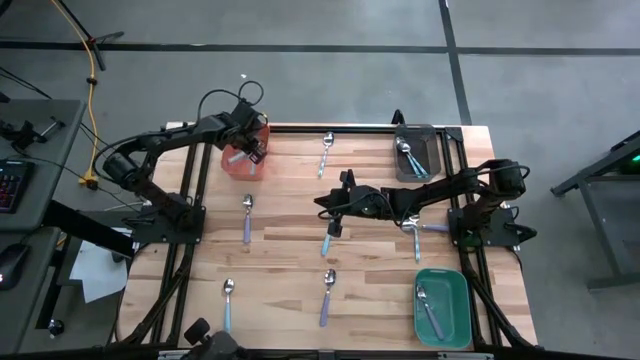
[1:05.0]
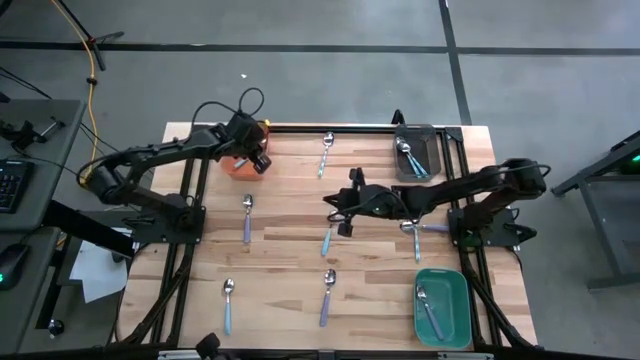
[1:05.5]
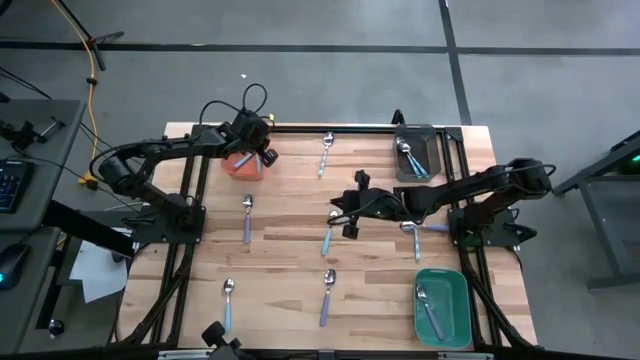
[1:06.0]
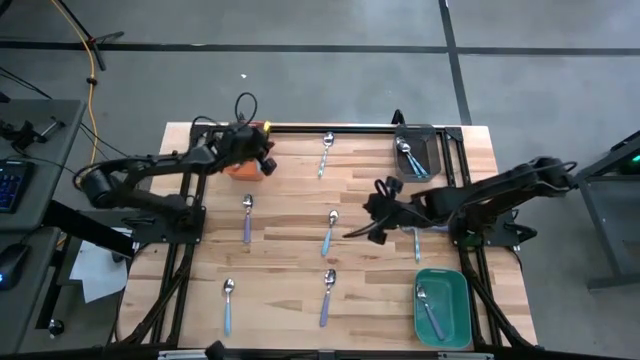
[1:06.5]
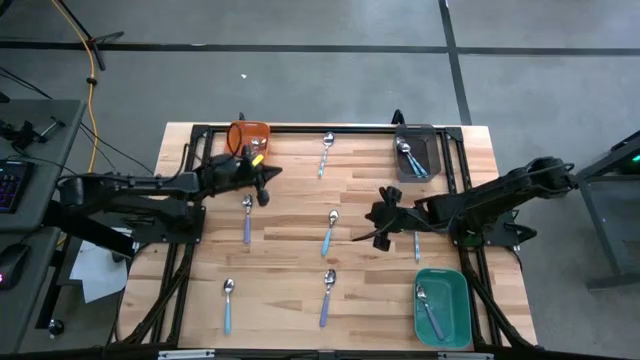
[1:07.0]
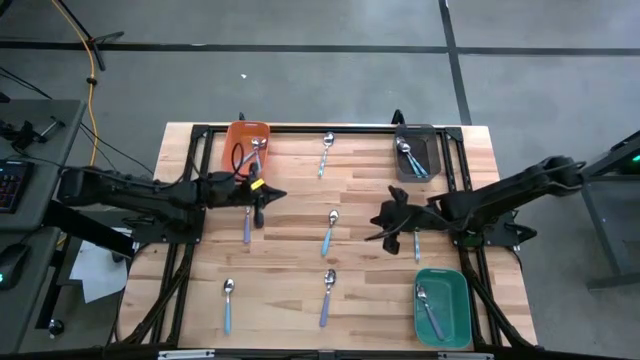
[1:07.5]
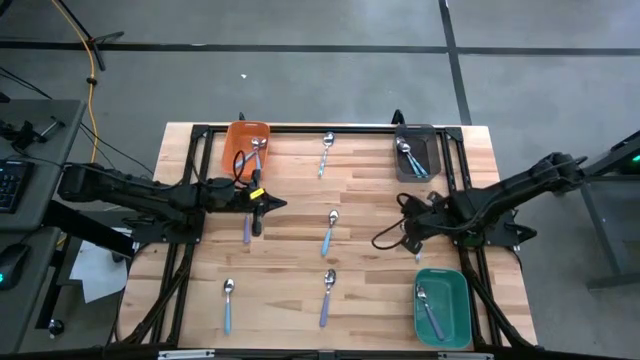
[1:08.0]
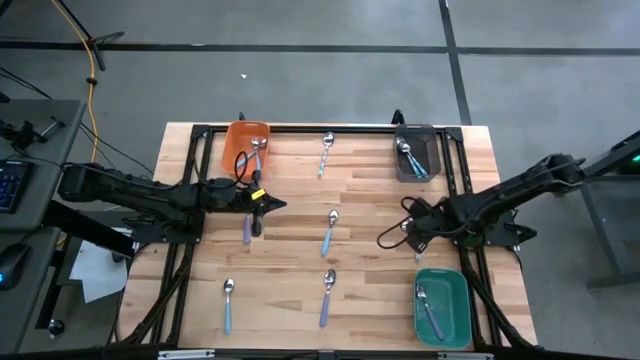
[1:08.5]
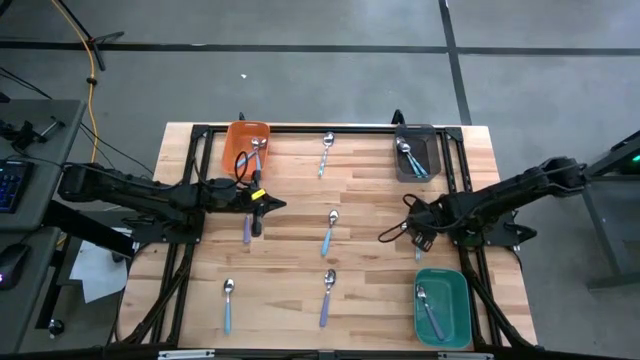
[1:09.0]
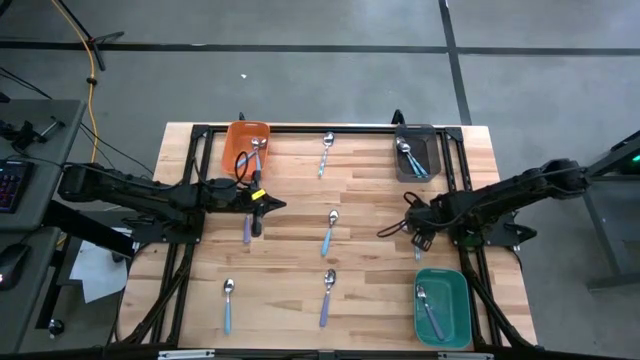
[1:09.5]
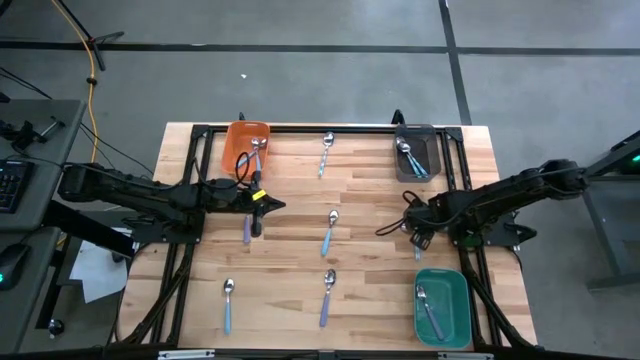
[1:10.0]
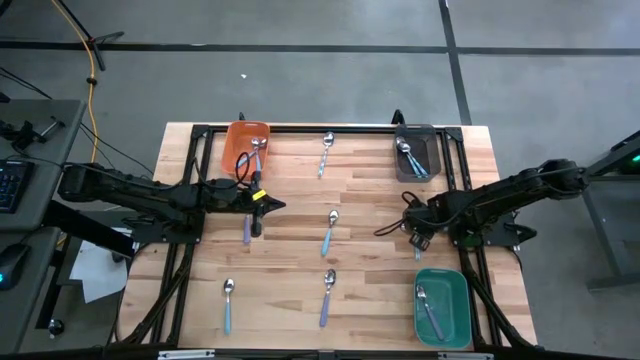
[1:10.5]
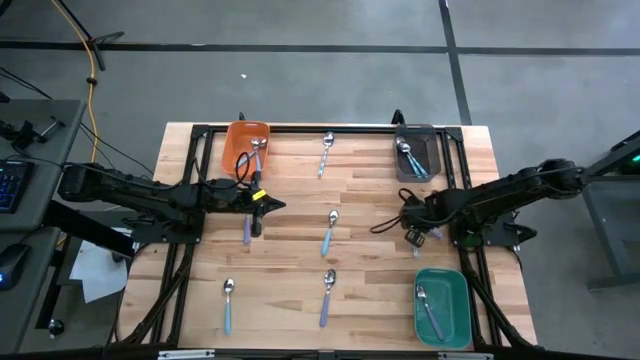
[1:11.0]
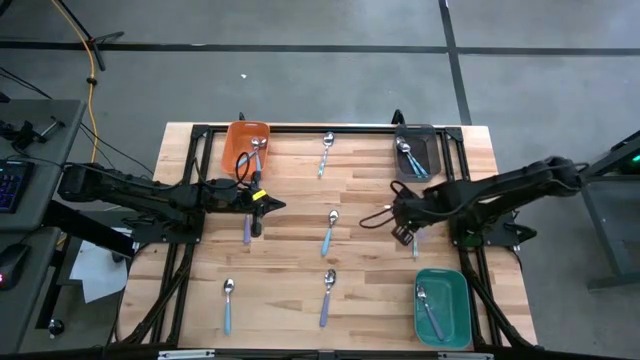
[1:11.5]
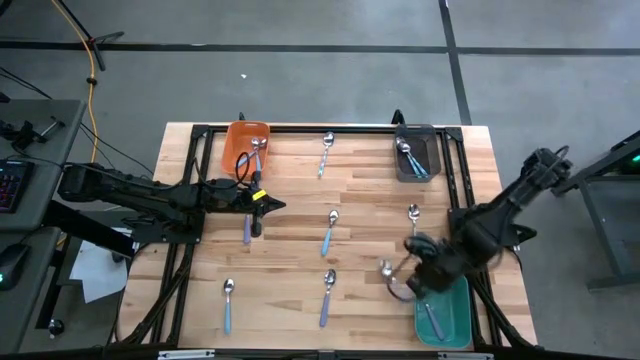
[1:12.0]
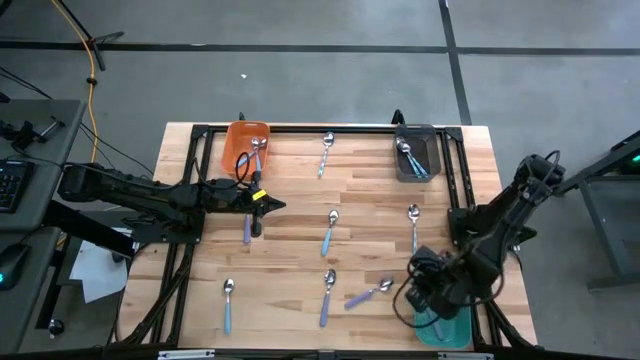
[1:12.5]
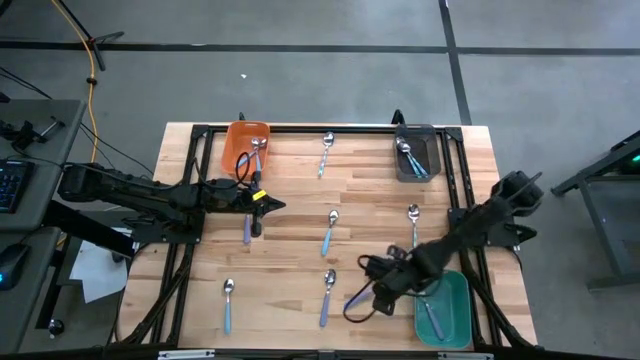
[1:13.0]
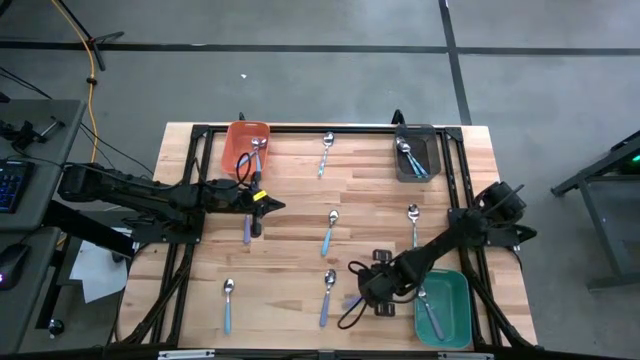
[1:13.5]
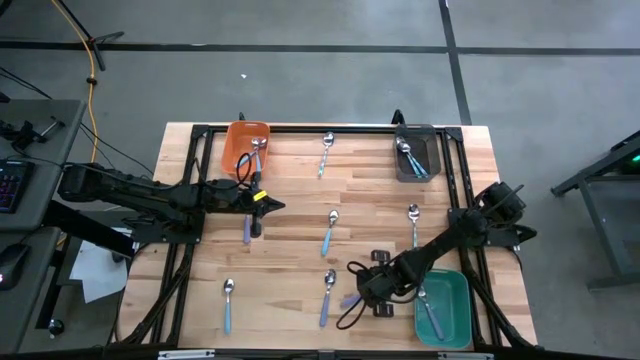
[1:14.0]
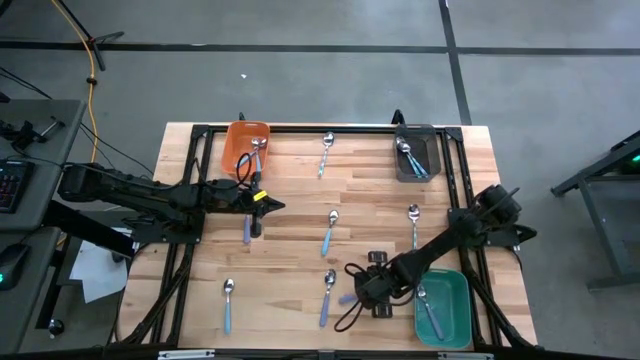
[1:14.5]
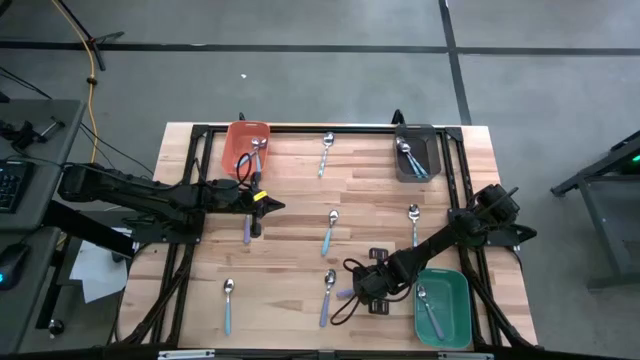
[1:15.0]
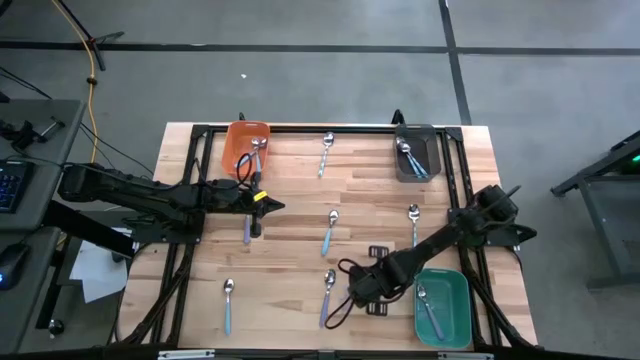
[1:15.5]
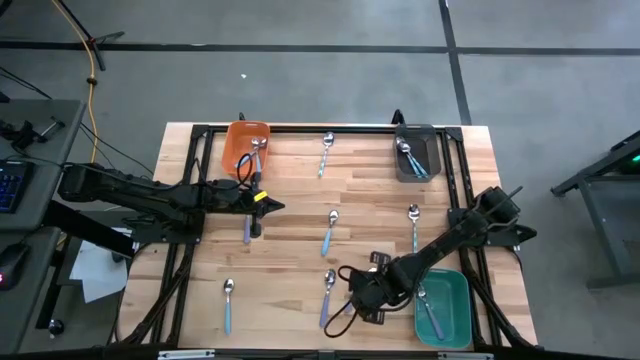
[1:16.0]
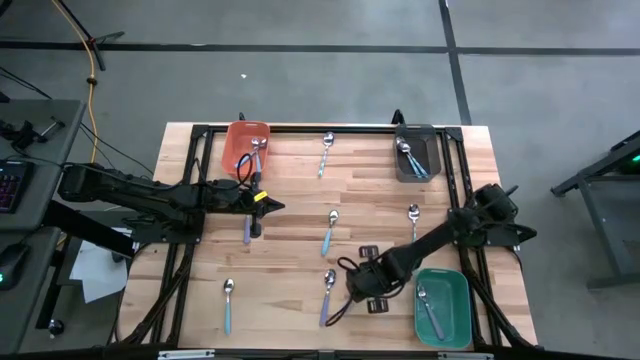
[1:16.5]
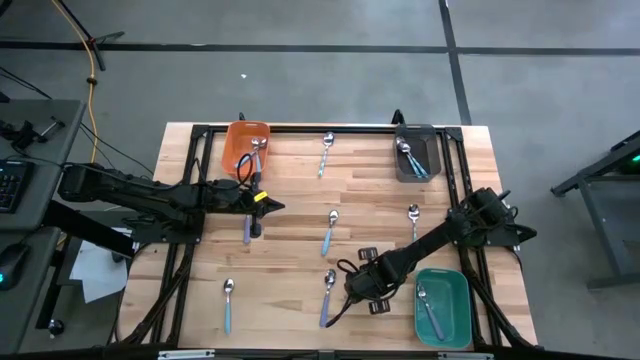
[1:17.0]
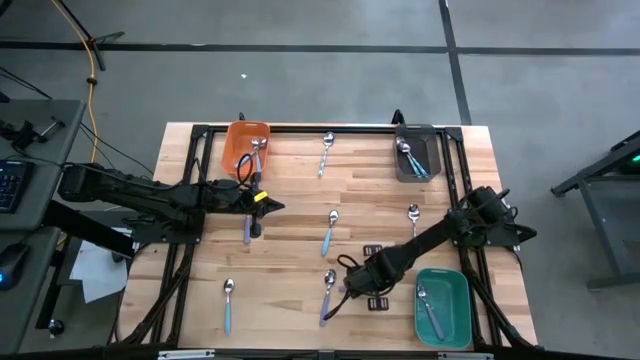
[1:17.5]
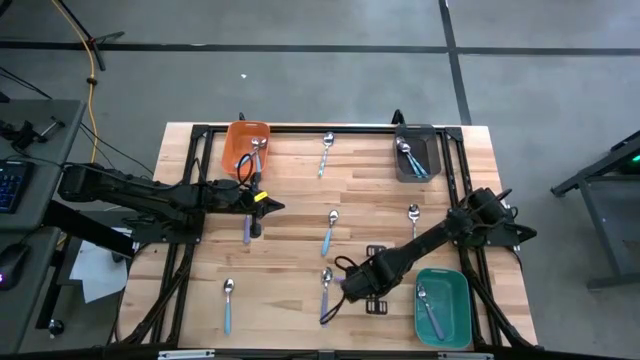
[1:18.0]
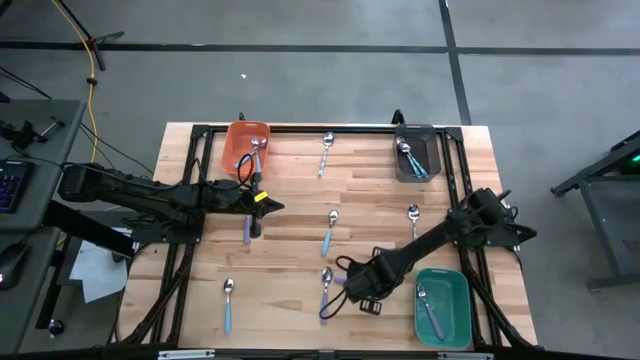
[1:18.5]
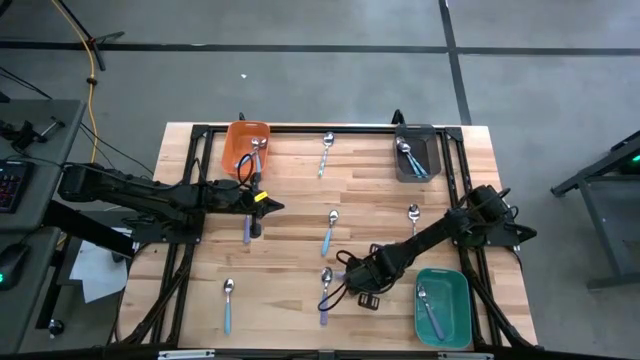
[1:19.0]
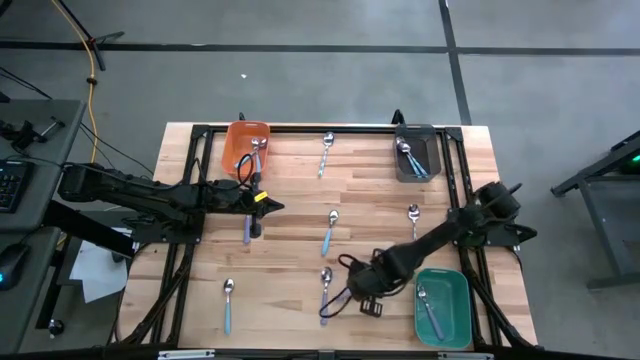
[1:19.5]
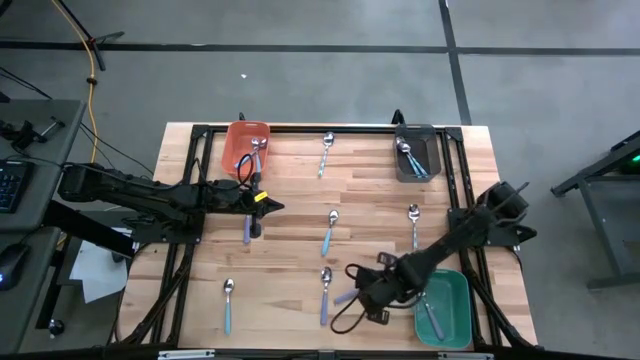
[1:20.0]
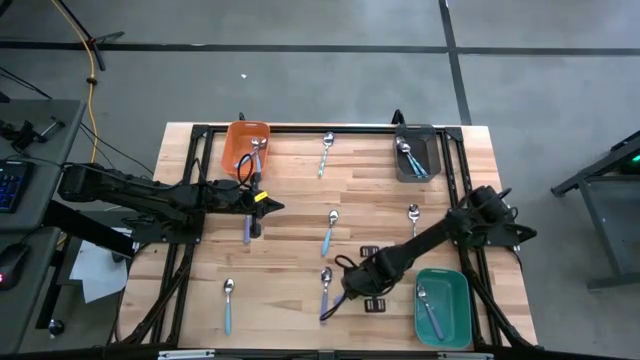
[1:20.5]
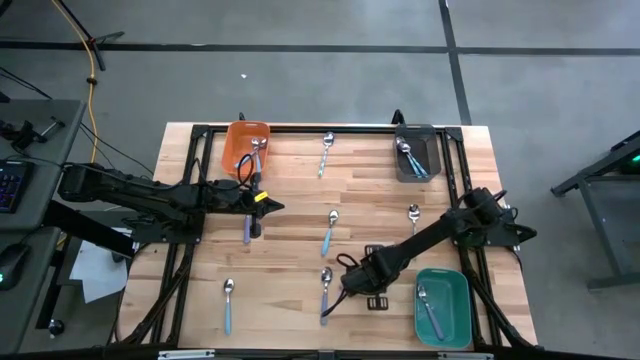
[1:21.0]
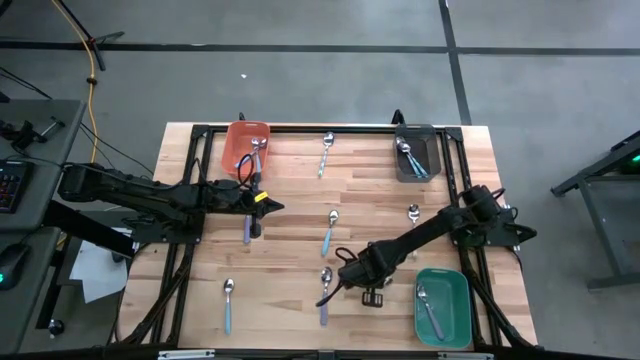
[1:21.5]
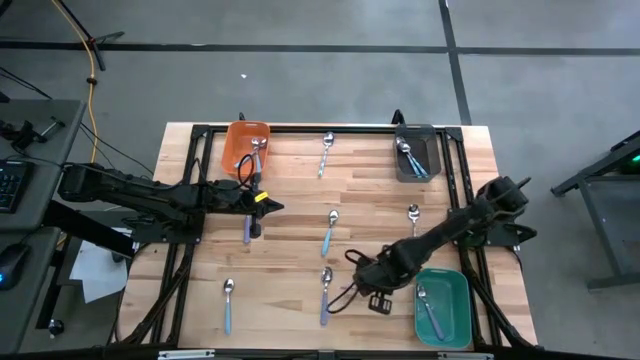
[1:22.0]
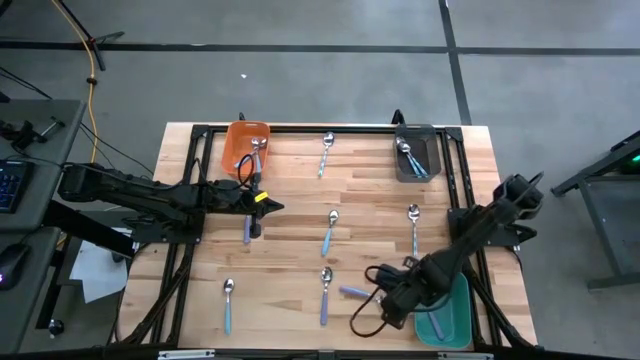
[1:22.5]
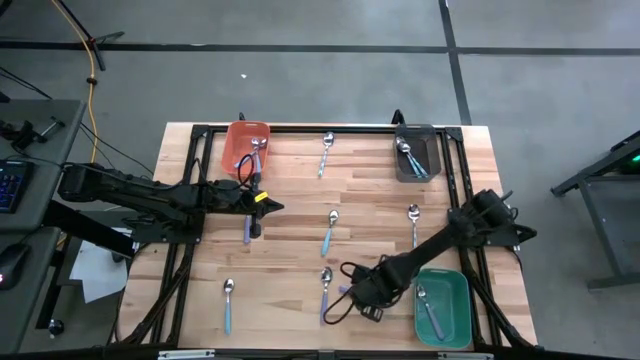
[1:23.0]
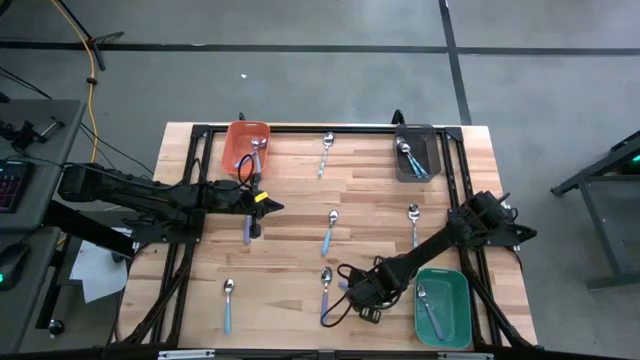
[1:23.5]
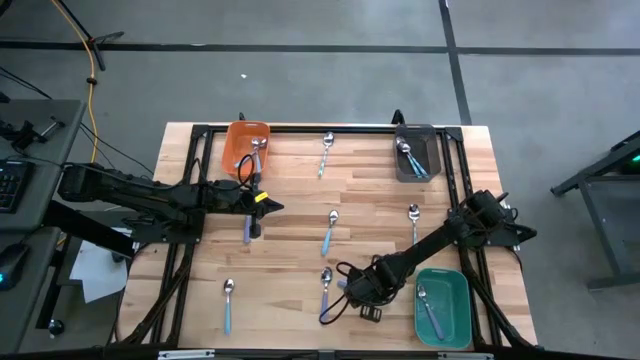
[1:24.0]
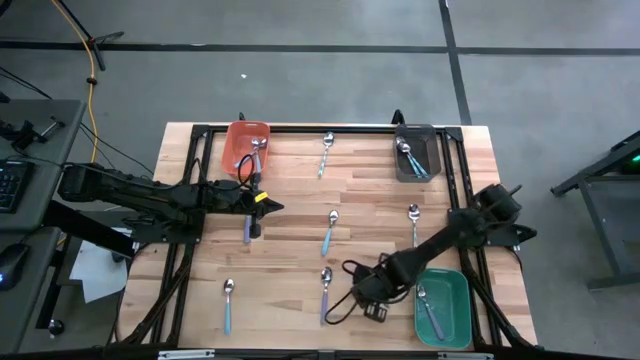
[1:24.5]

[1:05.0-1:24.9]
Task: Sort silverware by color (type)
Put the purple spoon into the green bin

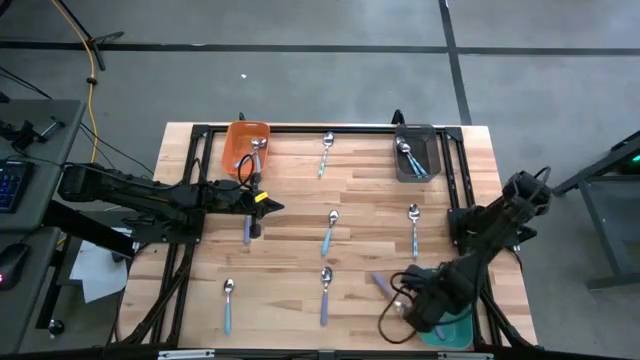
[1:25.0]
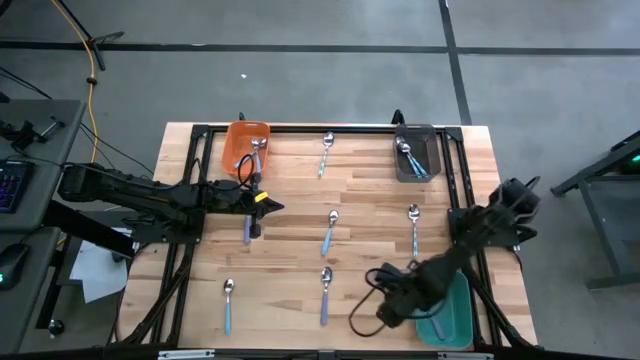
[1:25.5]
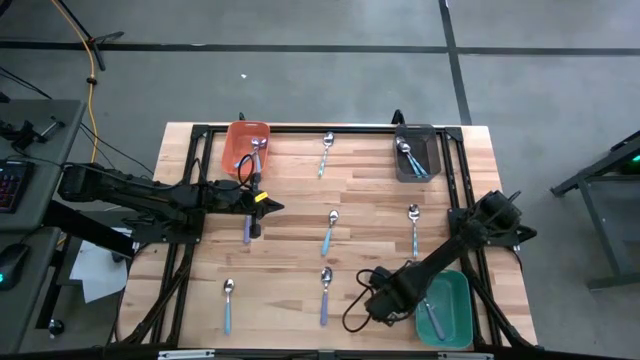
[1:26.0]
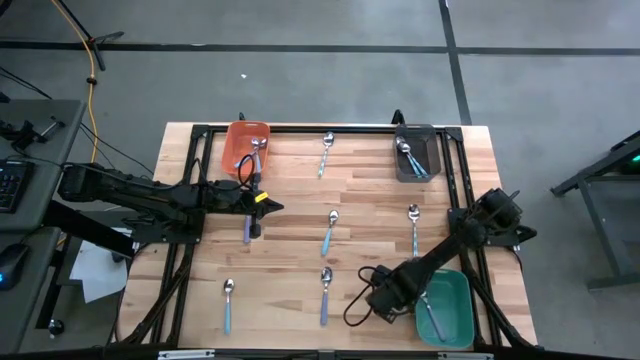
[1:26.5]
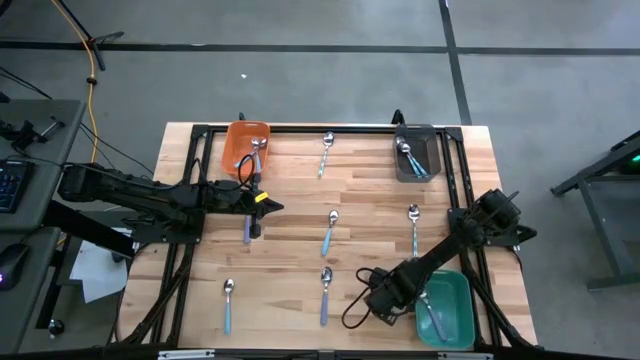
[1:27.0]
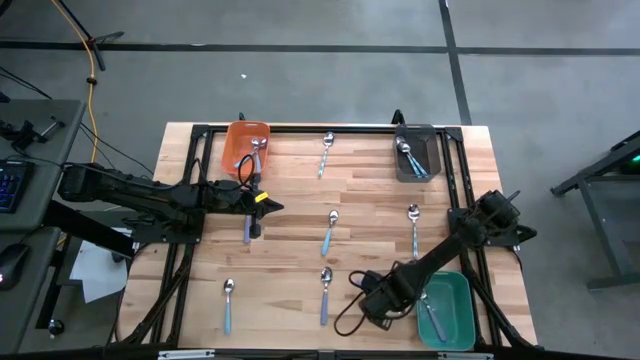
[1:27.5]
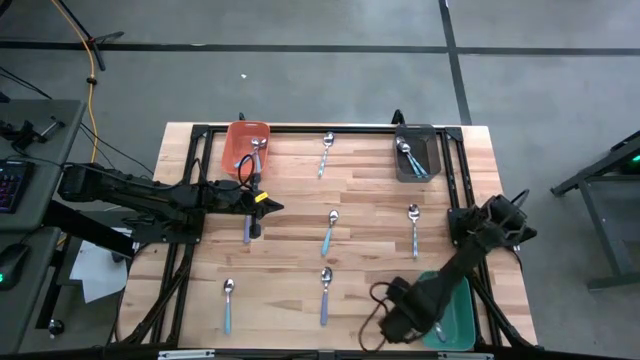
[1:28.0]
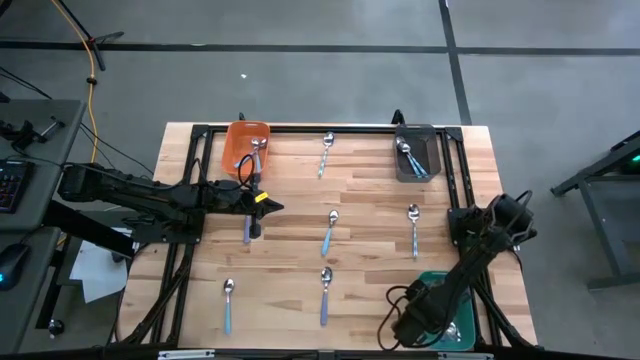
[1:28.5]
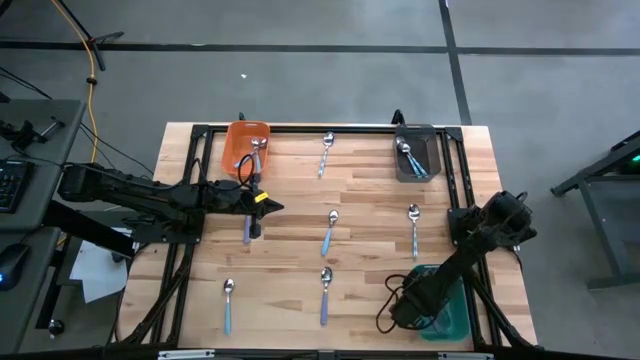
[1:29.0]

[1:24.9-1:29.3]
Put the purple spoon into the green bin
